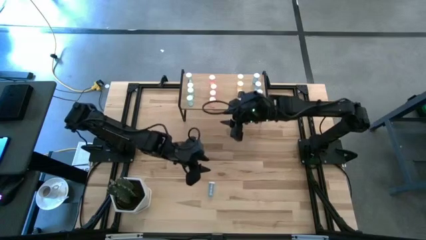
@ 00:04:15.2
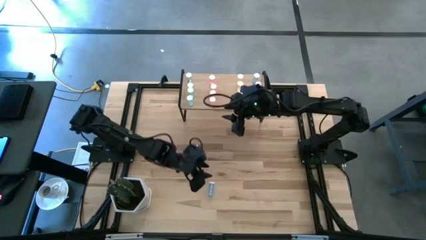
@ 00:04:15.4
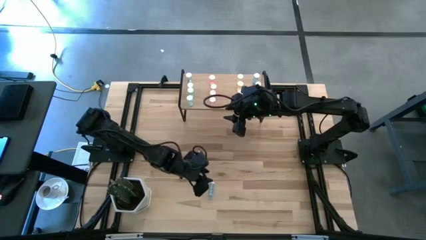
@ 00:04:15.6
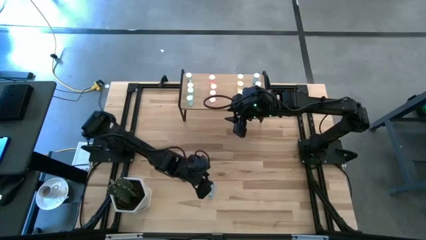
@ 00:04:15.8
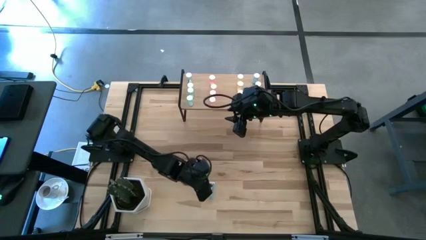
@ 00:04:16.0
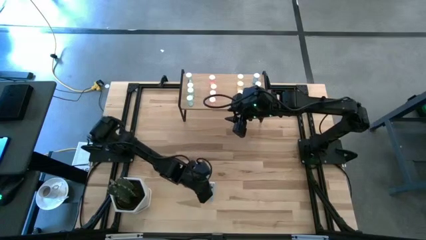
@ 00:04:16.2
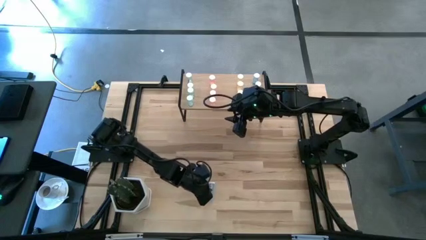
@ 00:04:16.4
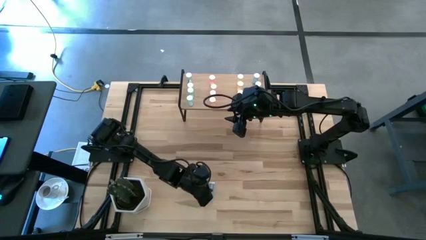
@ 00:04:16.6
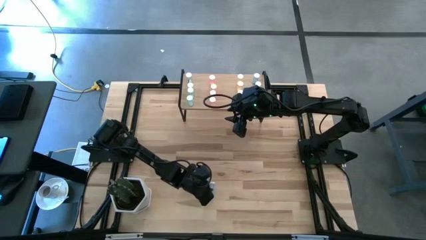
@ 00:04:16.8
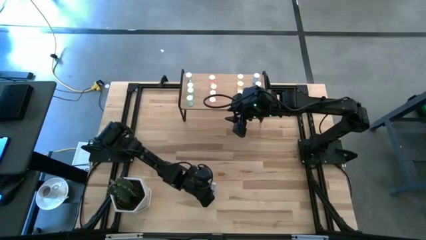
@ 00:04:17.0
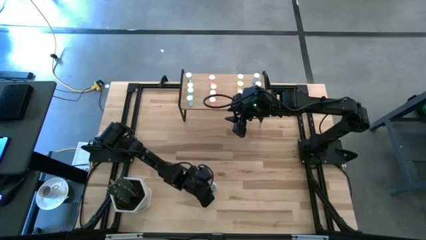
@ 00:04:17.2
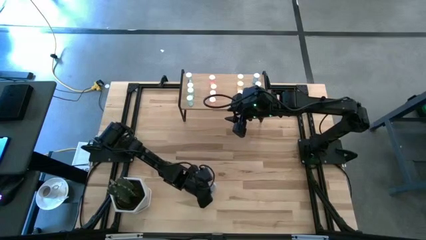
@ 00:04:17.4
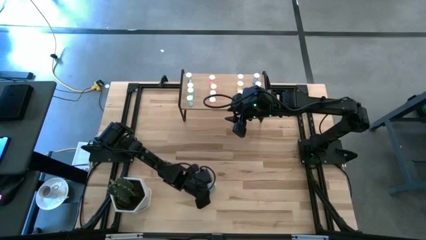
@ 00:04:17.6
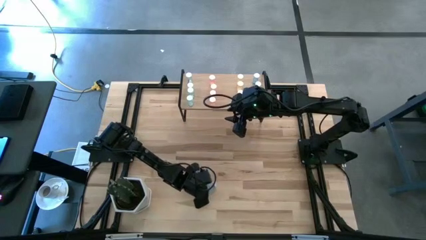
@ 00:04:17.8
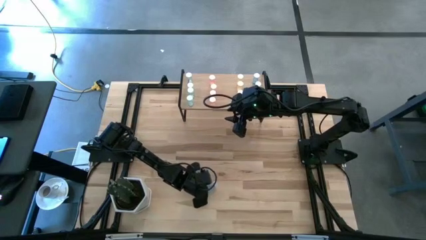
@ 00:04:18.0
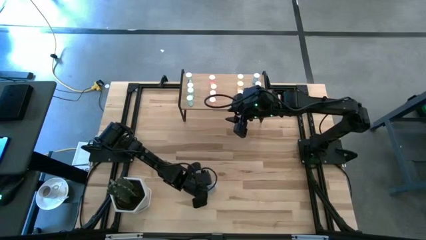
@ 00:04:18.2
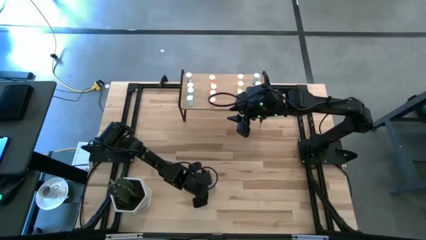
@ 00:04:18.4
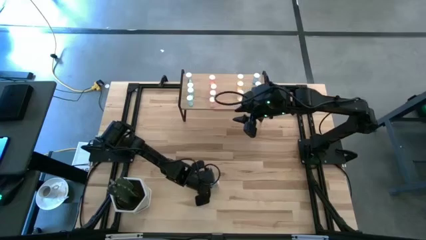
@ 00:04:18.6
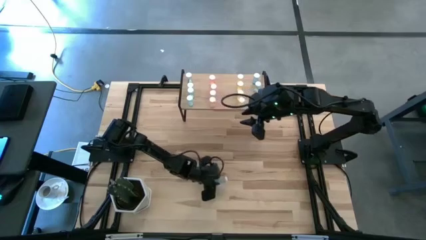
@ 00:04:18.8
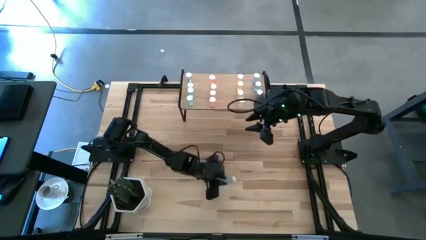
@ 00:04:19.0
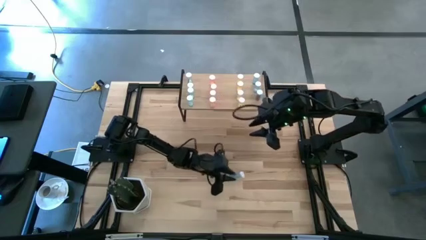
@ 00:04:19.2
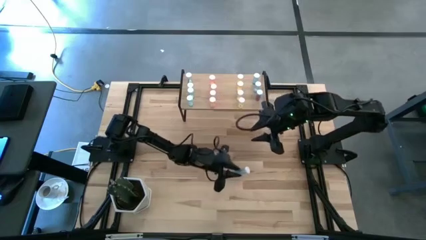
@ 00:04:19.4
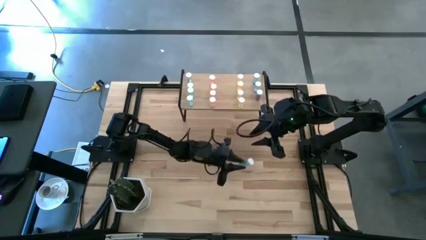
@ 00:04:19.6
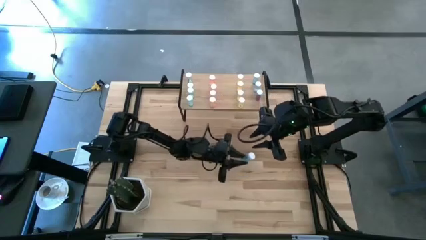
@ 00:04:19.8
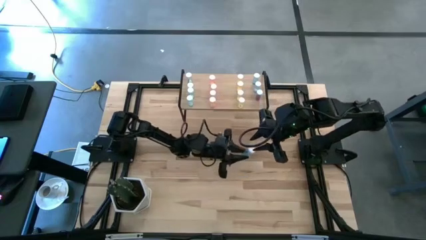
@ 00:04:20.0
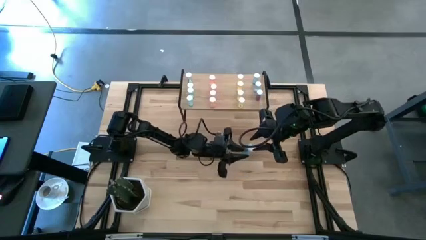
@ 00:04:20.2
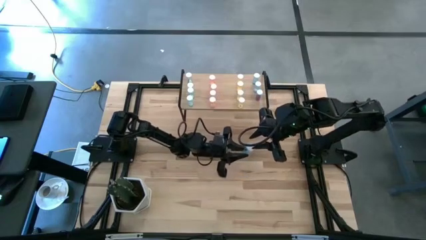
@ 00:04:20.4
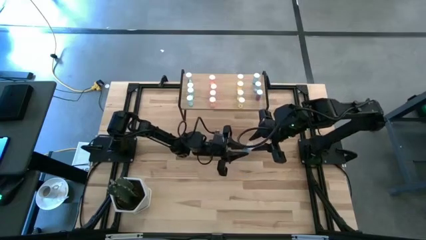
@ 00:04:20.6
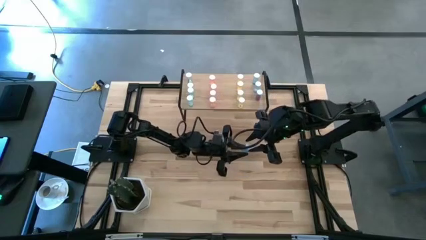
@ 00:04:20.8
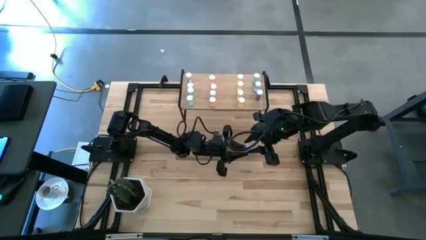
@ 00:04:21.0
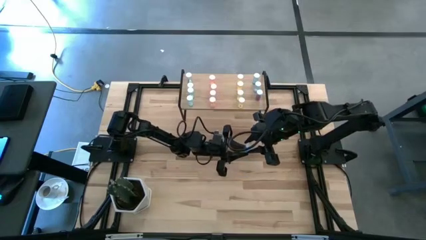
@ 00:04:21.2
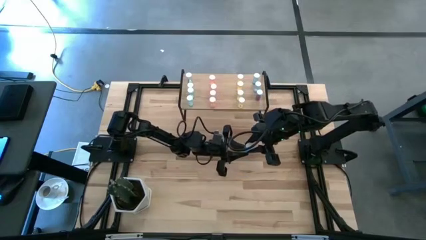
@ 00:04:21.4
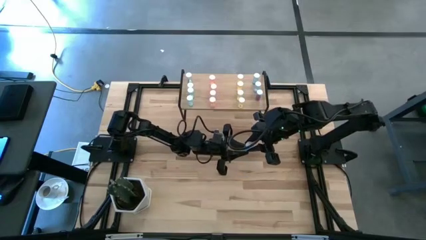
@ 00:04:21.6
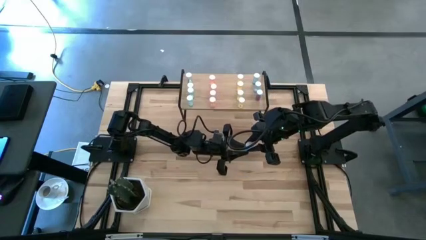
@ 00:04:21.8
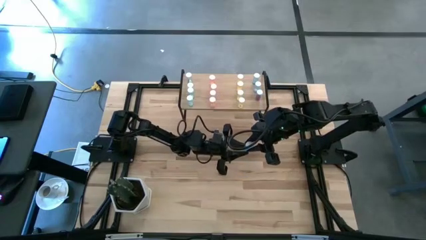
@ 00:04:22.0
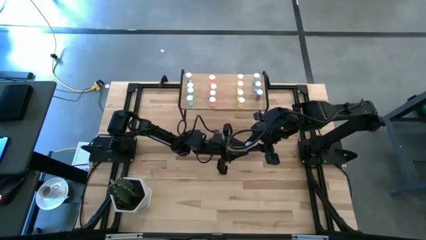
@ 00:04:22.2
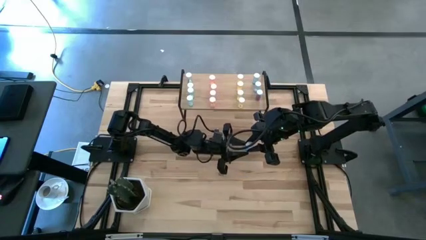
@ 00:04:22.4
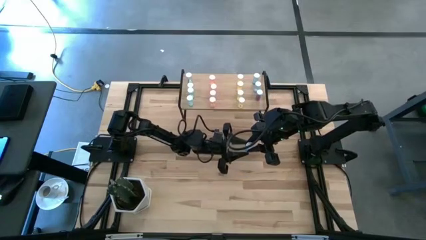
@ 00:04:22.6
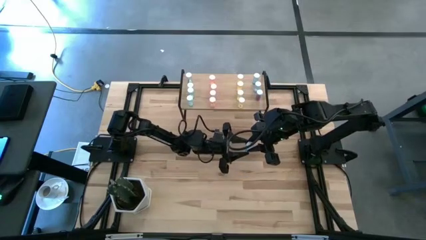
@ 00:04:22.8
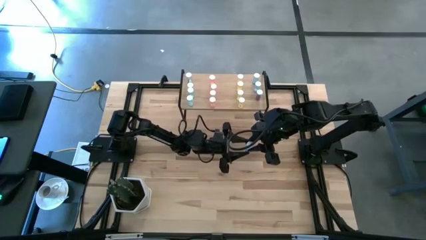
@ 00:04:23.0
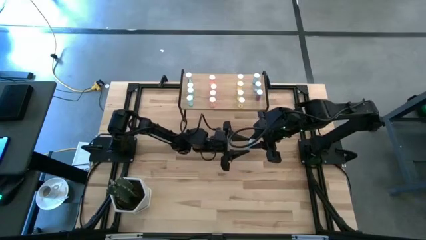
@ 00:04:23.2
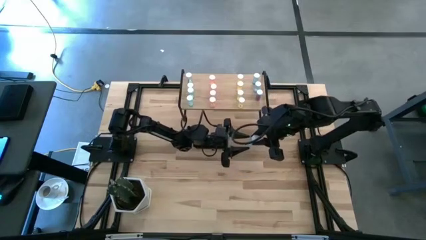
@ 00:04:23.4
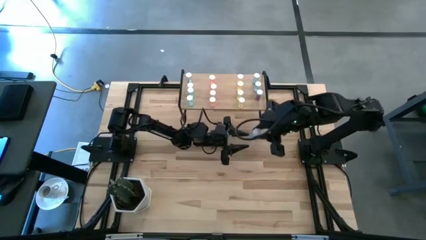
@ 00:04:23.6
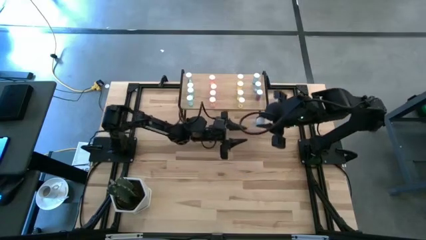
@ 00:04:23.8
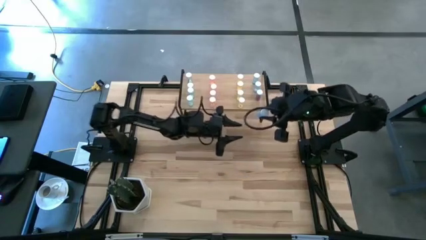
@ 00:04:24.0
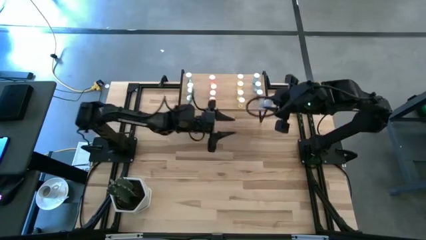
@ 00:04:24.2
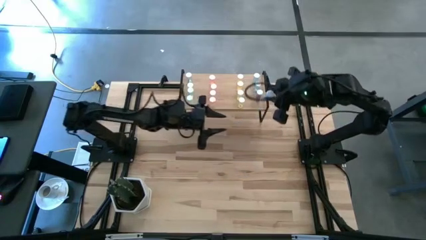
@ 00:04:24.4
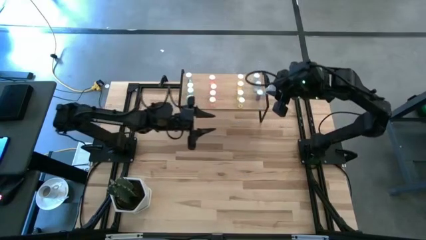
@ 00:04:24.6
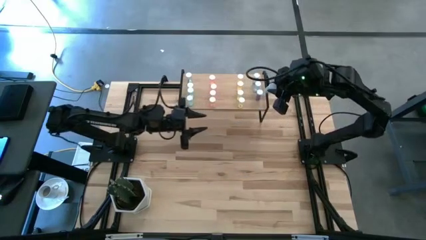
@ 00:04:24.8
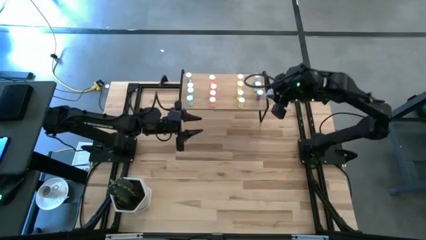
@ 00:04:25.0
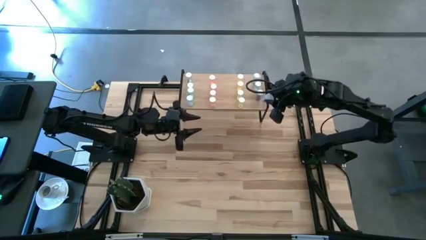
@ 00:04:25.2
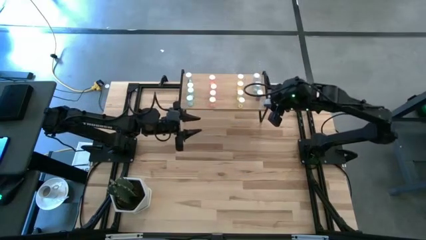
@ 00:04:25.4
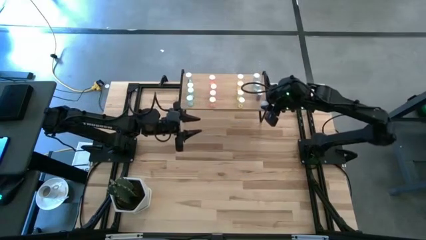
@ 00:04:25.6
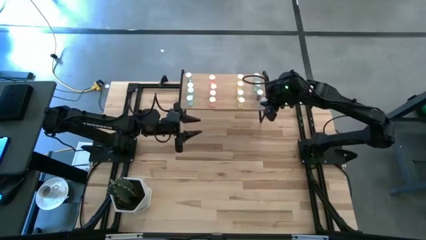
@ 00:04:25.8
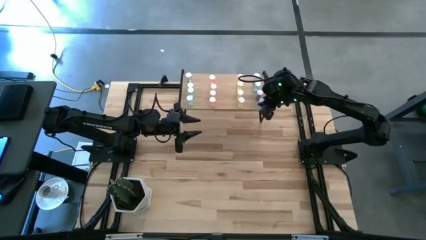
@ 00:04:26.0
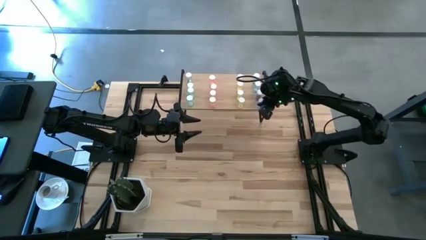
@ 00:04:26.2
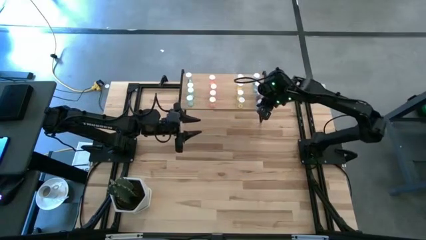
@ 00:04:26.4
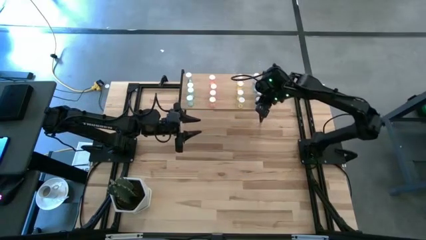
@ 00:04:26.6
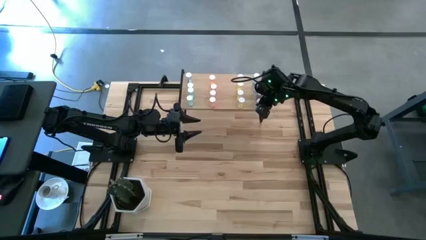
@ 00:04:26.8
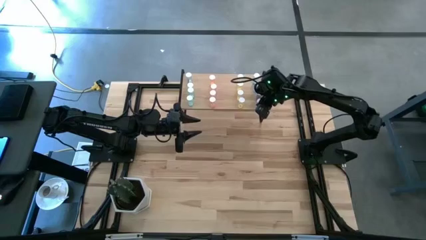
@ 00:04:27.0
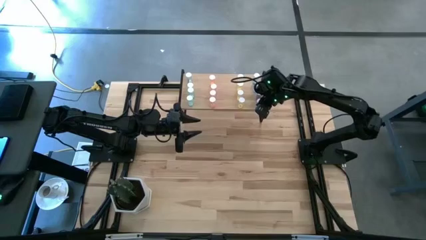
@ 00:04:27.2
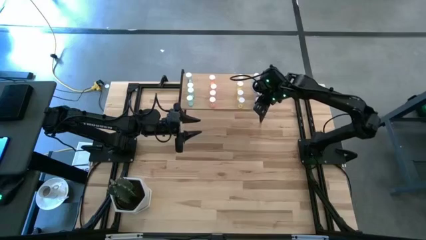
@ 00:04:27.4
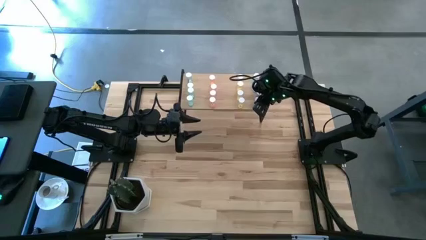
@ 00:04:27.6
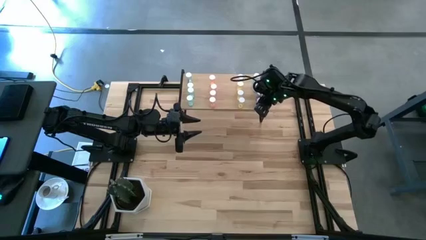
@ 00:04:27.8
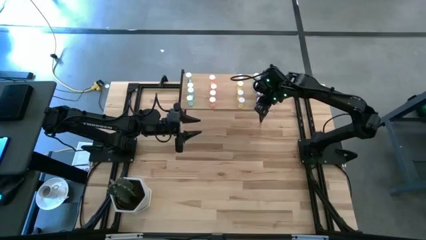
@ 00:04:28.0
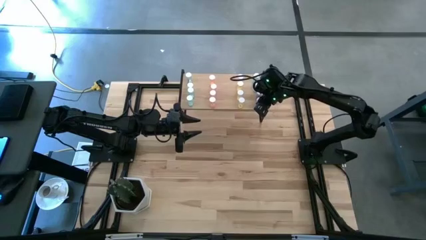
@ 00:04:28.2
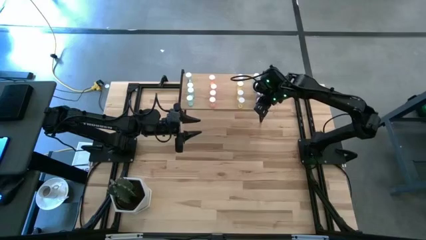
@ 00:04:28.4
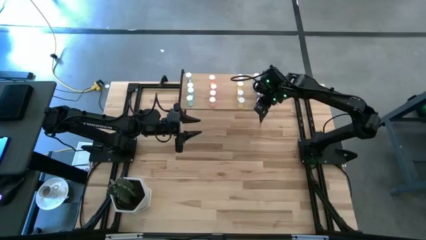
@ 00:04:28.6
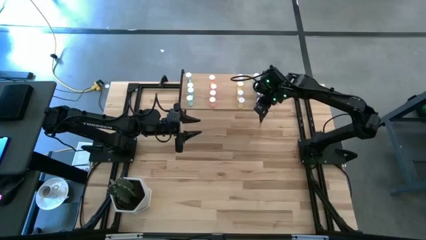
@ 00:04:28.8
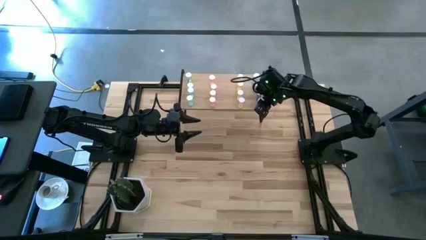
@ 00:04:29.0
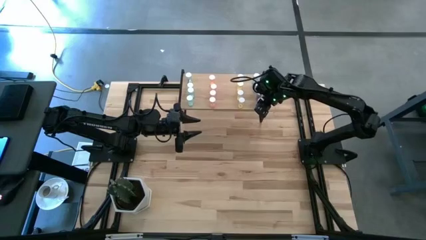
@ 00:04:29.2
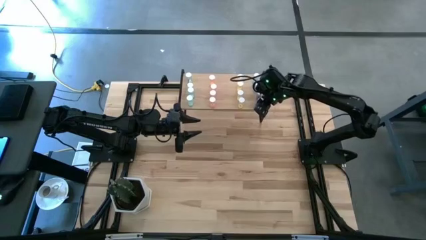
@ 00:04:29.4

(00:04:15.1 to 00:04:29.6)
Task: Pick and place medicine bottles onto shelf by color
Align the blue pill bottle with the blue pill bottle
